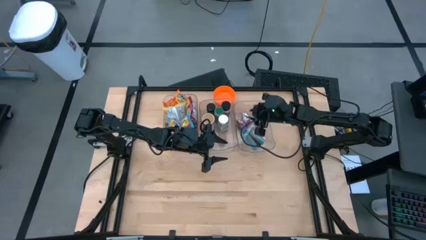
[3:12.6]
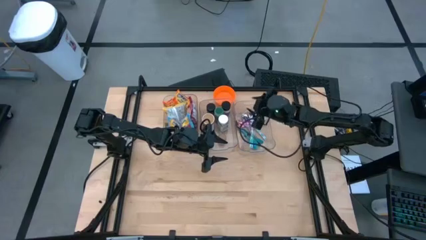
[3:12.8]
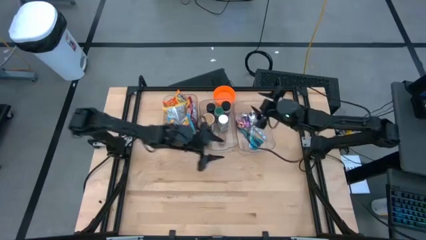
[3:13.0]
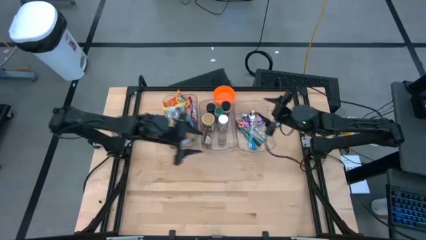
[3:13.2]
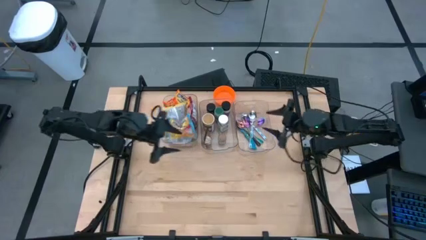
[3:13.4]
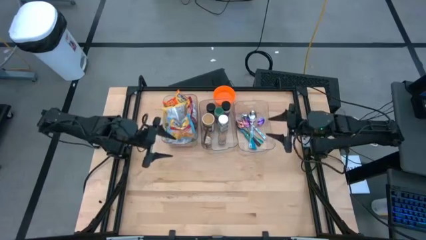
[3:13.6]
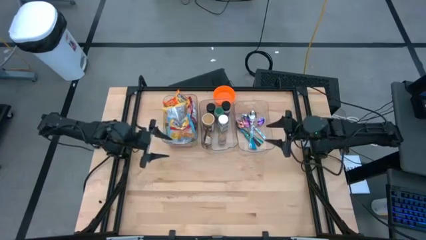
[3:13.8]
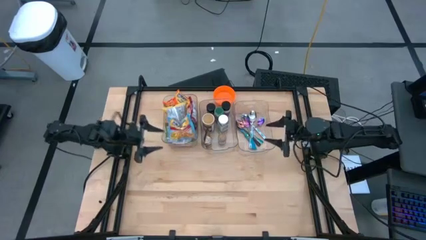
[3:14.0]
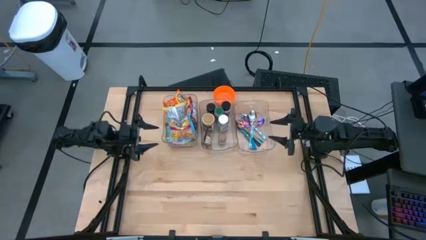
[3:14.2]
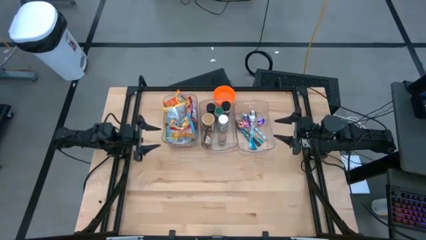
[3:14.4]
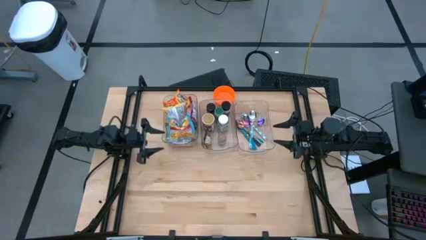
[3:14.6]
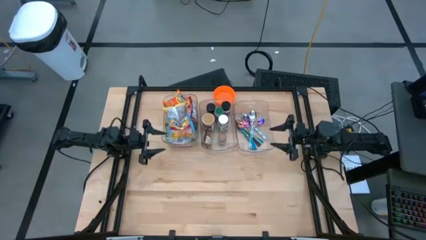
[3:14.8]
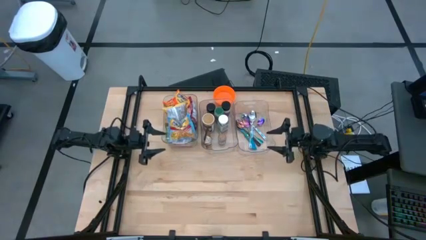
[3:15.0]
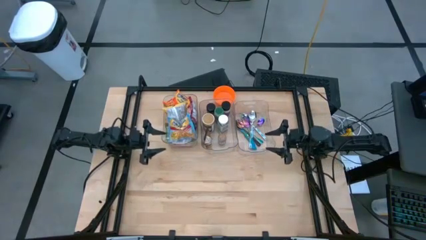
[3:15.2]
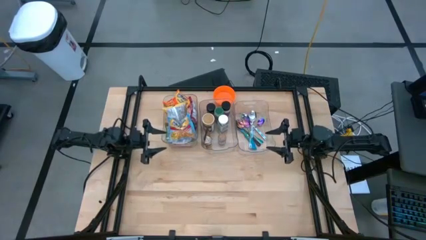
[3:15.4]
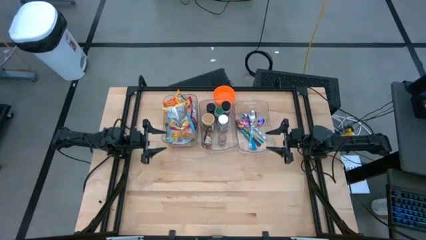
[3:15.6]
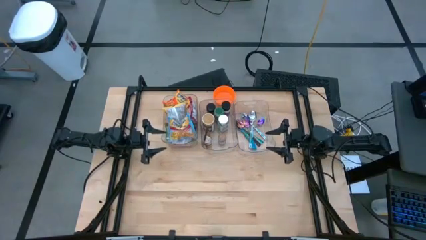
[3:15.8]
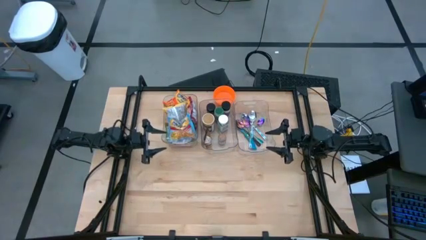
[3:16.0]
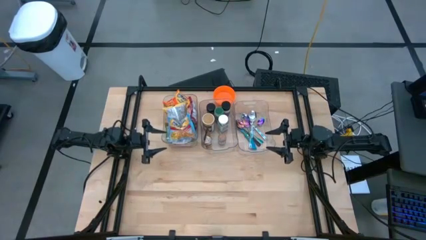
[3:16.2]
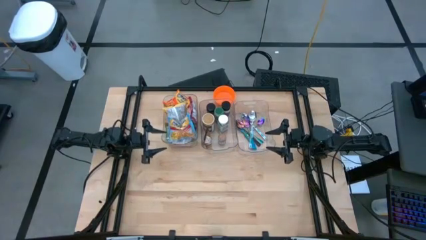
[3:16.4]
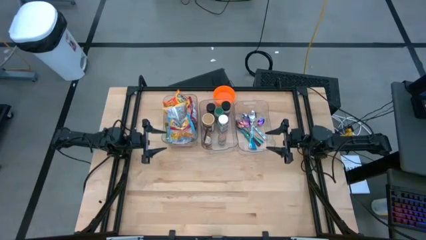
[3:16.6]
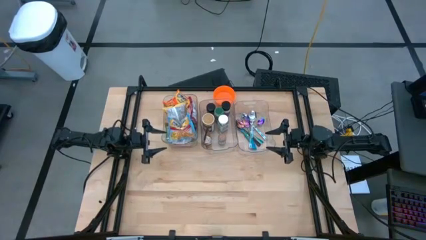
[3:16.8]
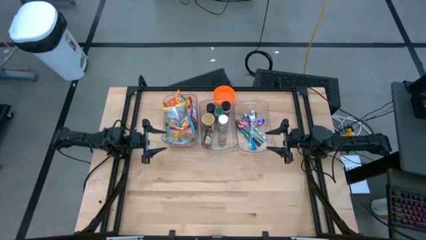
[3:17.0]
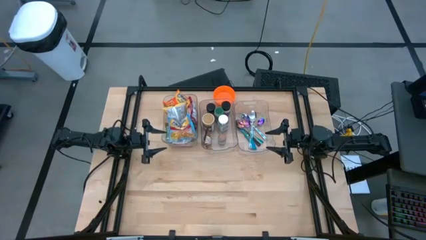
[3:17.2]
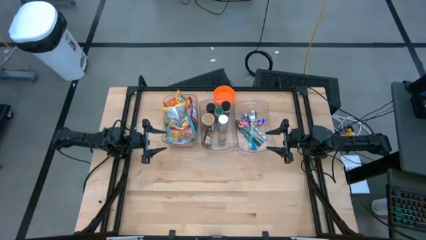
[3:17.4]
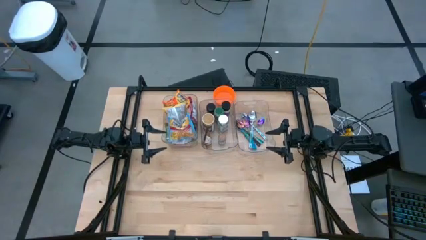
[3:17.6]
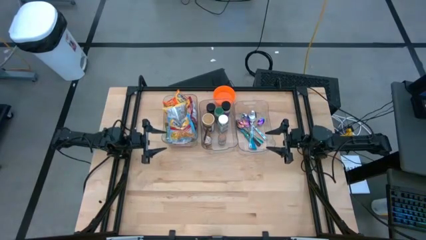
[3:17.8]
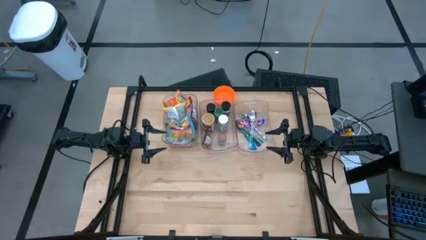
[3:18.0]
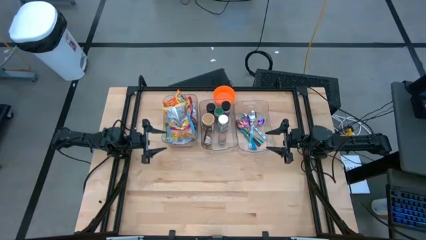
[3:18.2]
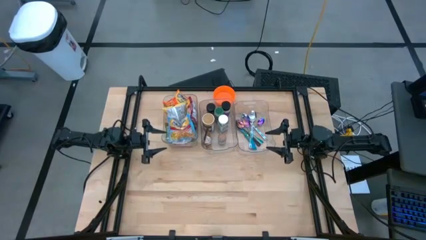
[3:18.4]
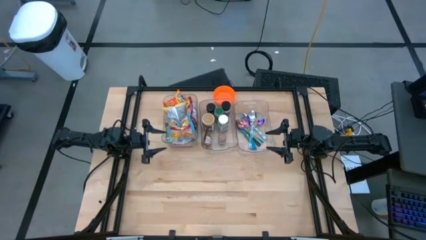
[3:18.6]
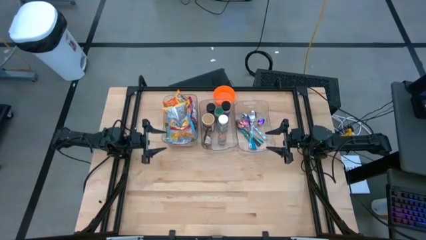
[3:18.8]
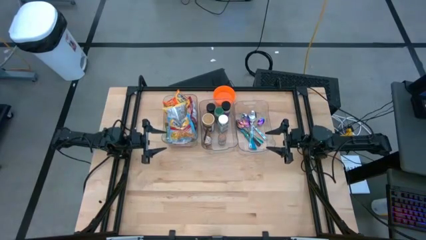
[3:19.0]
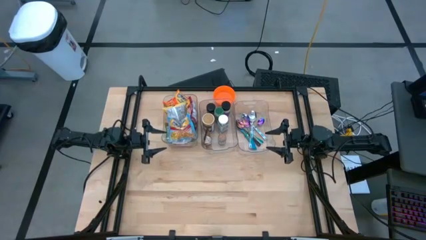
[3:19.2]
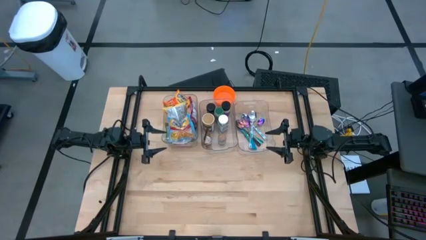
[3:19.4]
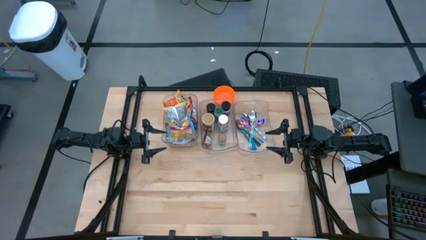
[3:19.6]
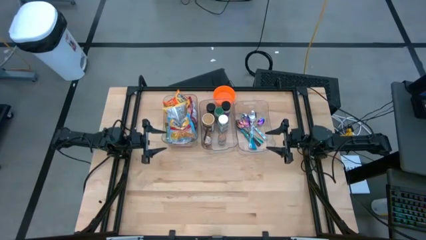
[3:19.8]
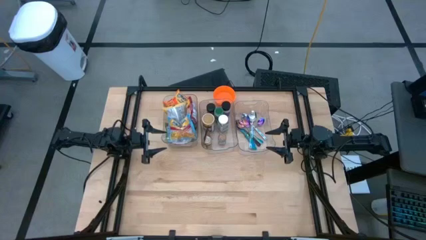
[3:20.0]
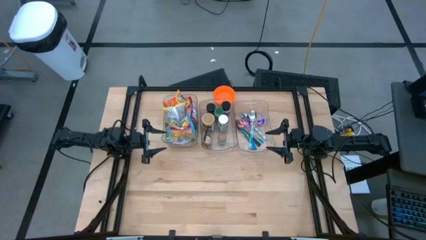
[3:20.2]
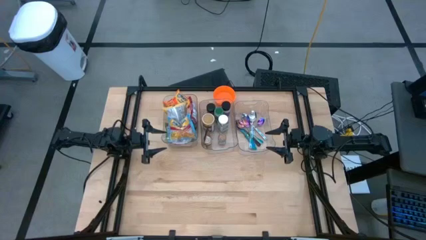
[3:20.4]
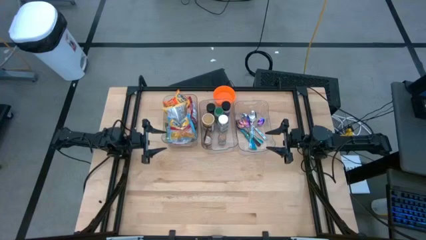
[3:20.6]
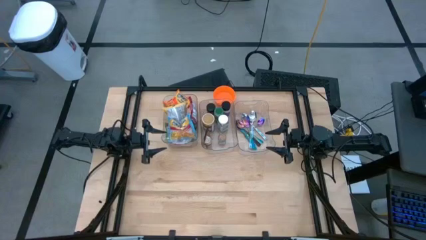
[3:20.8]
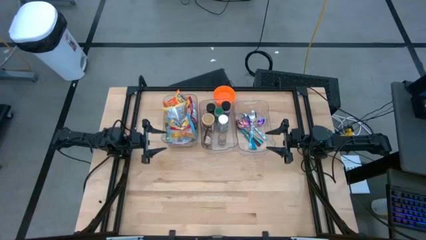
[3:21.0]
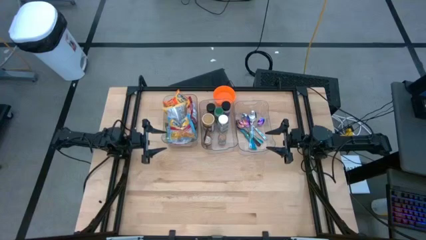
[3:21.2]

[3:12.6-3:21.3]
Task: Pick & Place Food Item
Return to Home Position

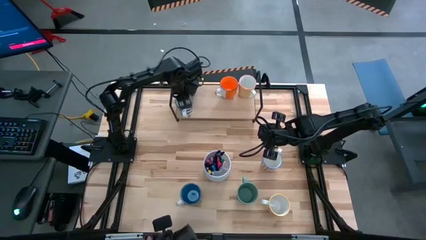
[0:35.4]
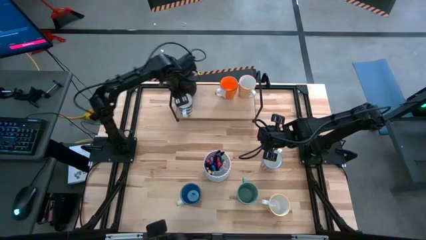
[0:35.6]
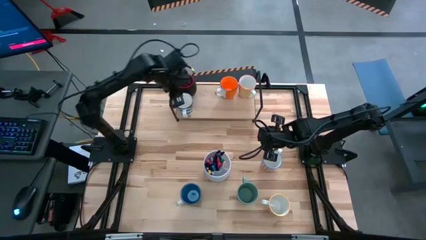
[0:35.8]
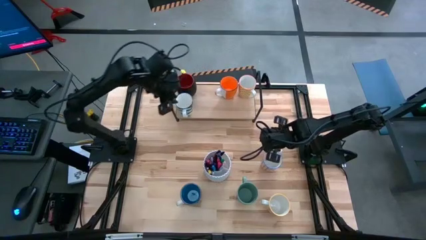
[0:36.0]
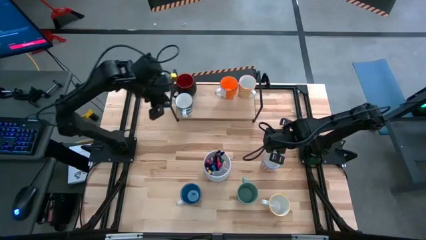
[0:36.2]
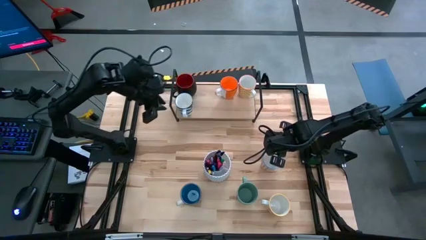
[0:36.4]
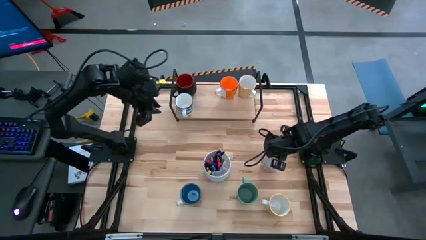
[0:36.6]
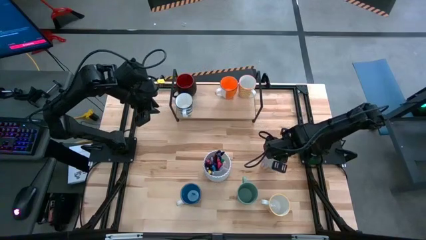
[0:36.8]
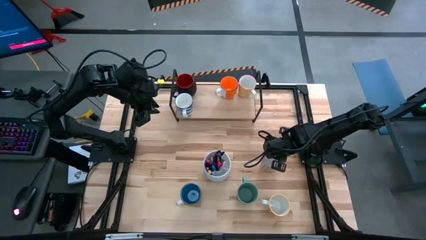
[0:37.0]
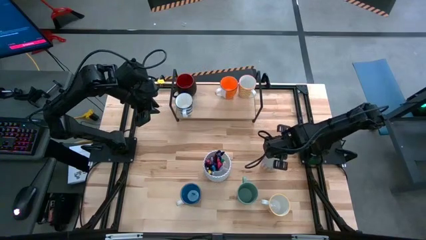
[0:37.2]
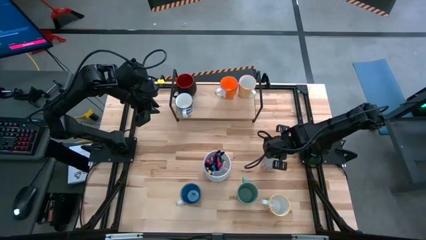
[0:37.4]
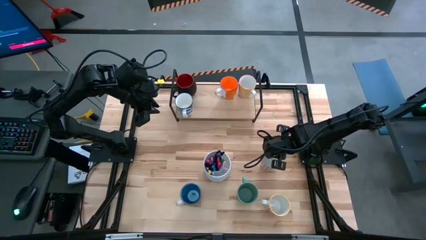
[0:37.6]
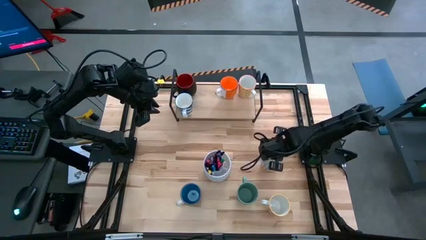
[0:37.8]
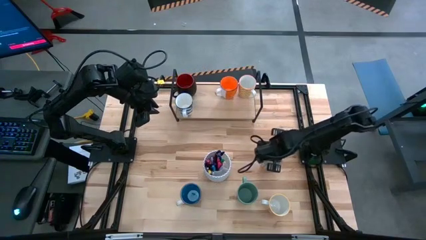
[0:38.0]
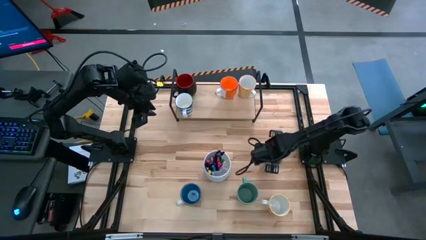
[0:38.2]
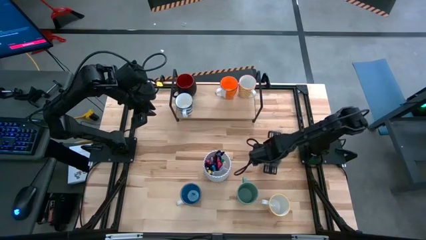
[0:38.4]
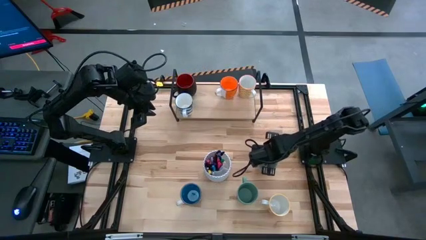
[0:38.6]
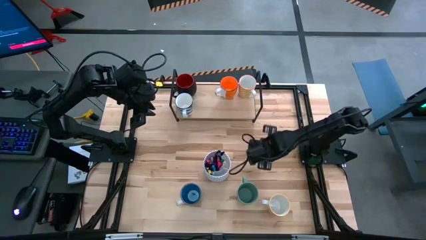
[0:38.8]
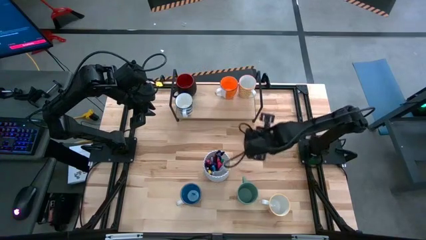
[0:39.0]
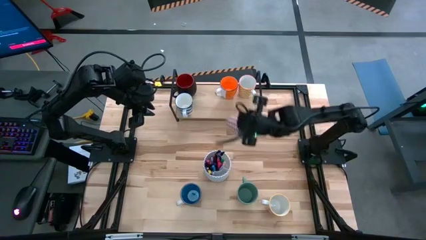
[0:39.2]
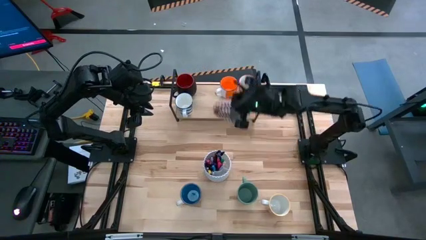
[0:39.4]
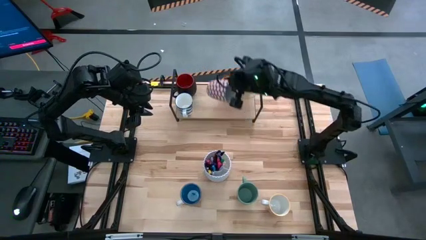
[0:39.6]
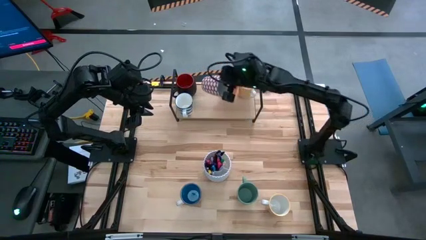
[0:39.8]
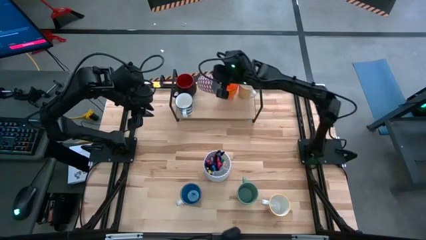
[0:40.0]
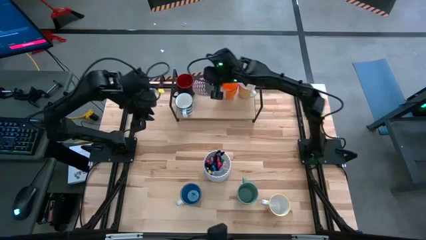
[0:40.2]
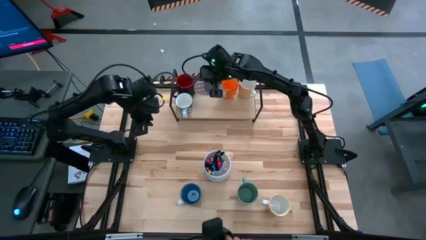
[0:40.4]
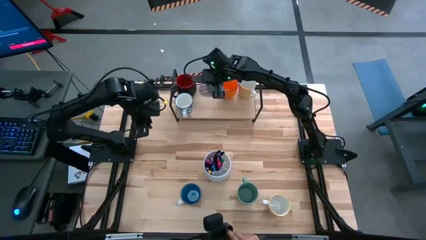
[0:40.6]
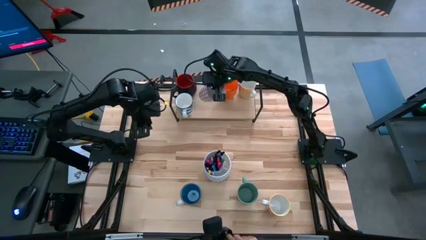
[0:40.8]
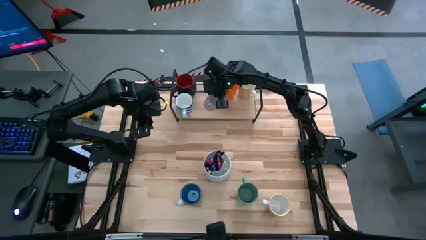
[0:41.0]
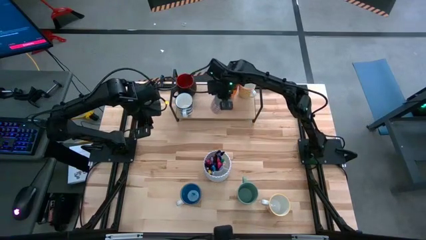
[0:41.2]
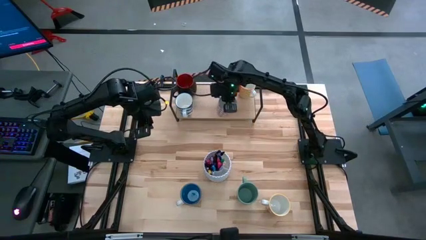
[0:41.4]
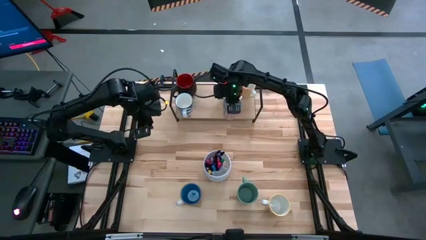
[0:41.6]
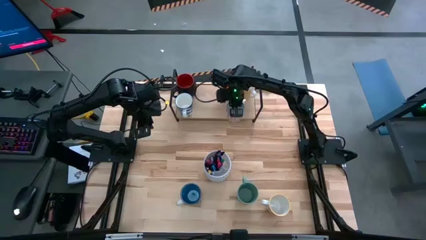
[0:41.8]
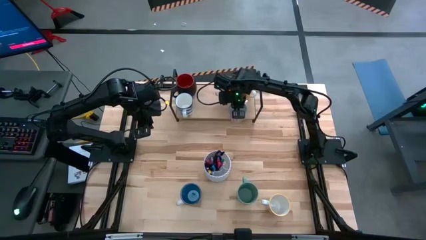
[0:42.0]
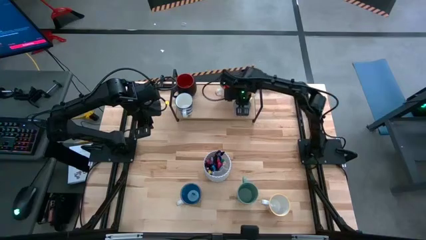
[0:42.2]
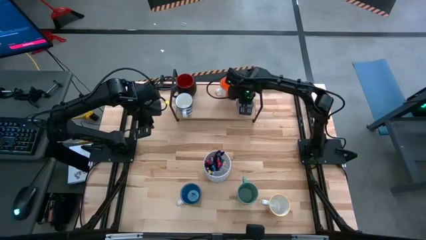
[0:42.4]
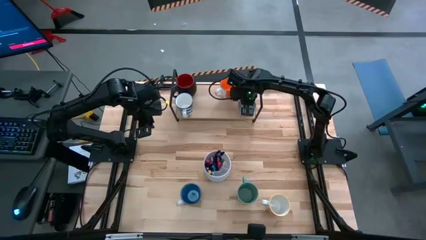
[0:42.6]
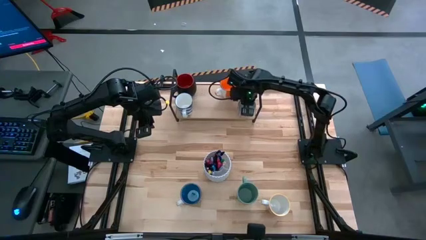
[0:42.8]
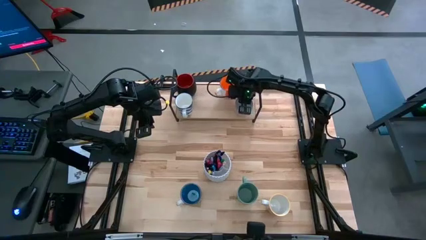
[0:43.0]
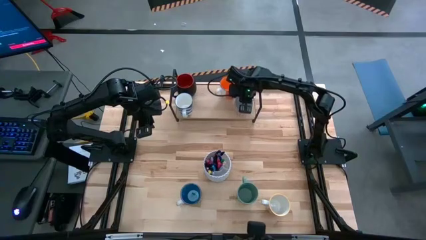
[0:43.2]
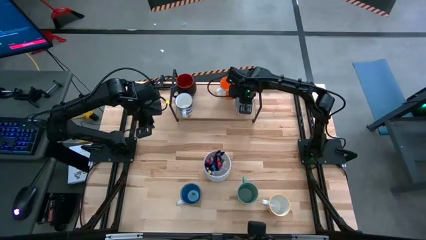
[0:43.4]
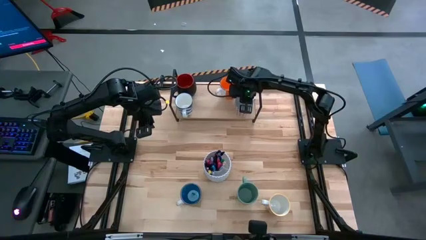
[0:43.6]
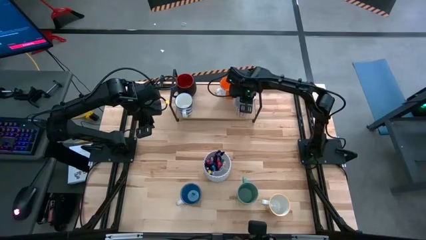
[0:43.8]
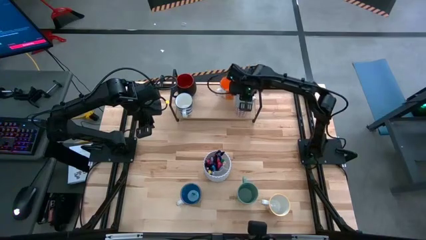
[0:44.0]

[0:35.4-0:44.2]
Task: Place coffee mugs
Put the red pattern mug on the shelf
